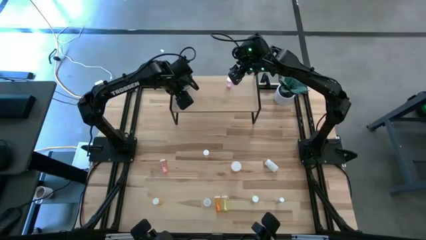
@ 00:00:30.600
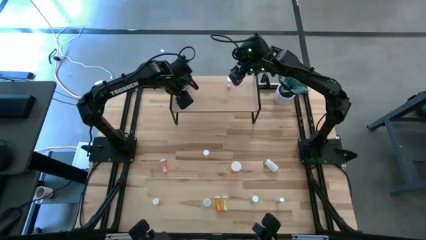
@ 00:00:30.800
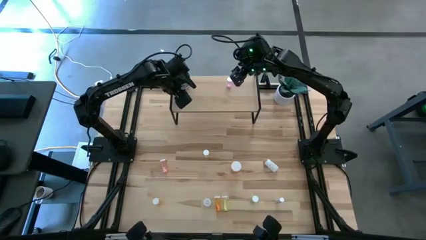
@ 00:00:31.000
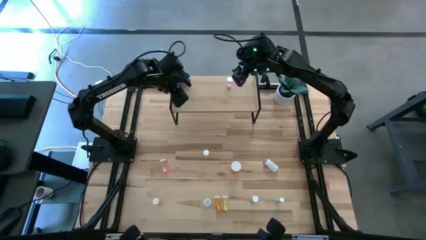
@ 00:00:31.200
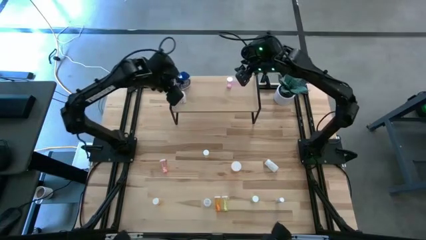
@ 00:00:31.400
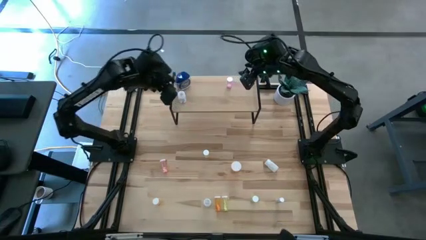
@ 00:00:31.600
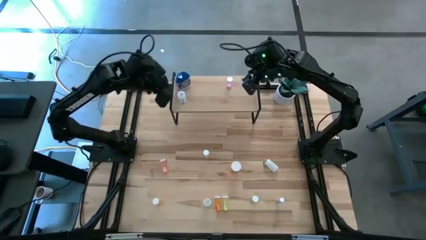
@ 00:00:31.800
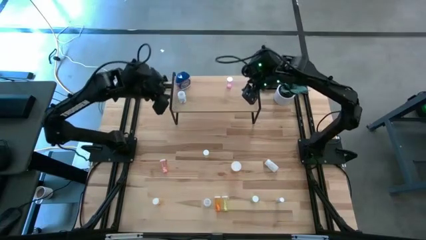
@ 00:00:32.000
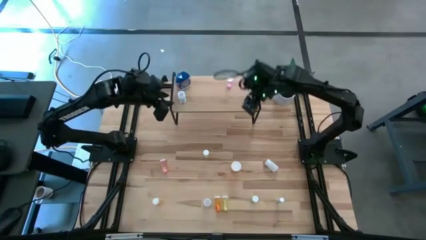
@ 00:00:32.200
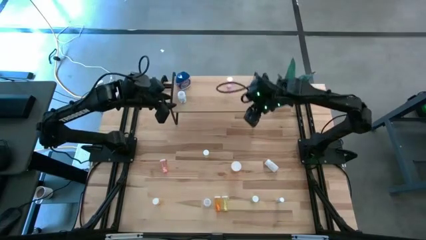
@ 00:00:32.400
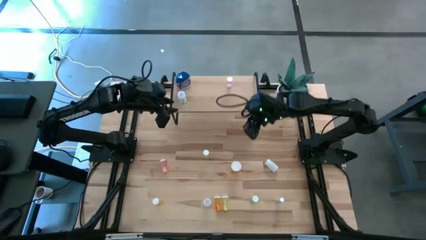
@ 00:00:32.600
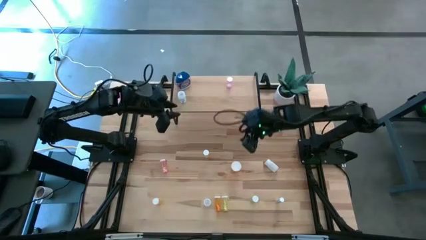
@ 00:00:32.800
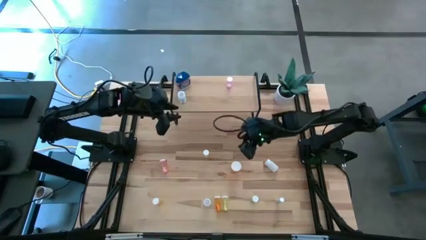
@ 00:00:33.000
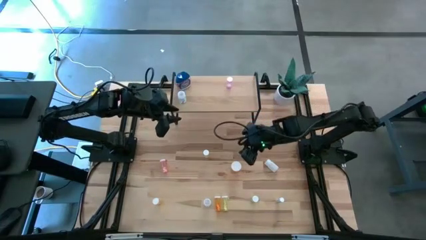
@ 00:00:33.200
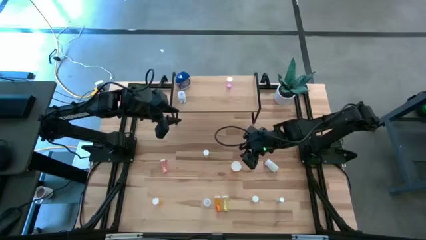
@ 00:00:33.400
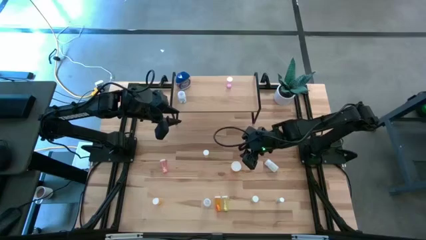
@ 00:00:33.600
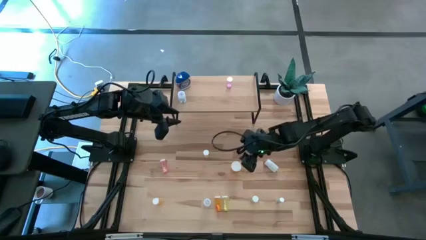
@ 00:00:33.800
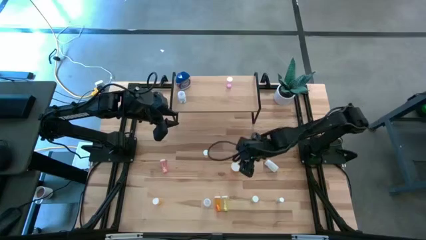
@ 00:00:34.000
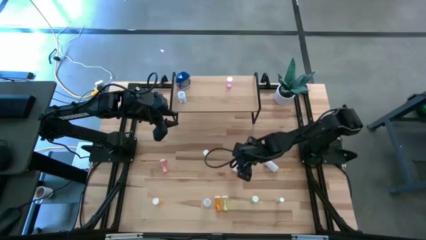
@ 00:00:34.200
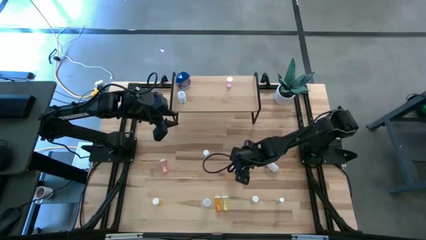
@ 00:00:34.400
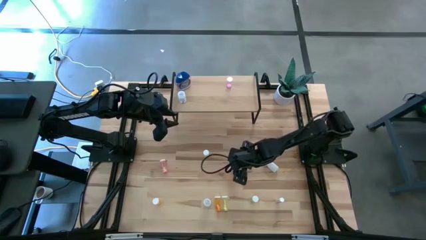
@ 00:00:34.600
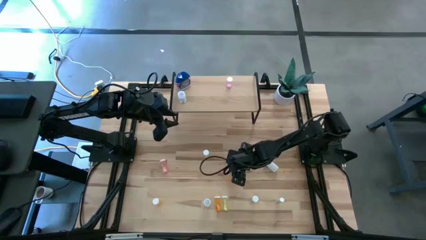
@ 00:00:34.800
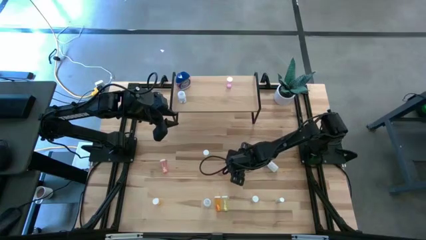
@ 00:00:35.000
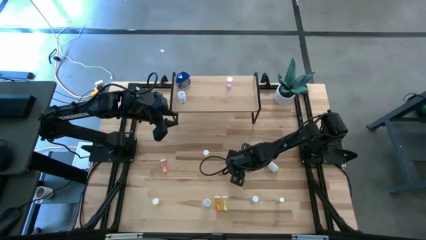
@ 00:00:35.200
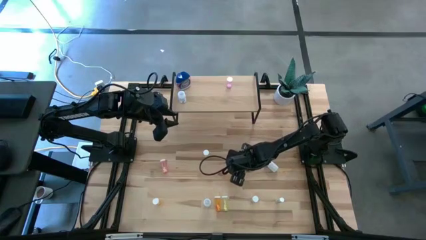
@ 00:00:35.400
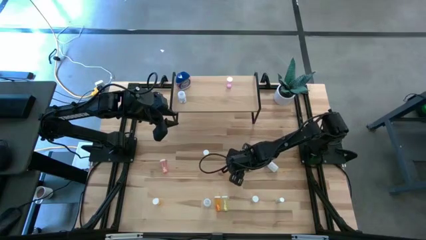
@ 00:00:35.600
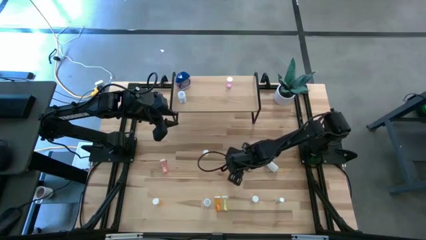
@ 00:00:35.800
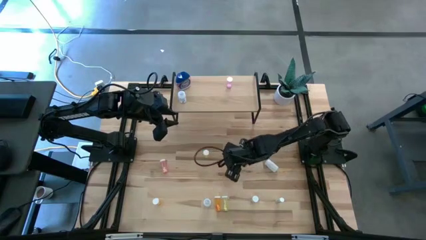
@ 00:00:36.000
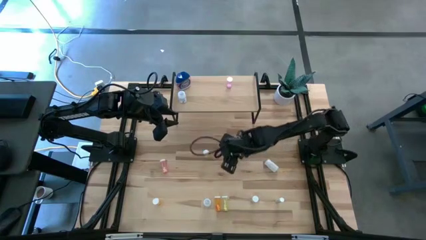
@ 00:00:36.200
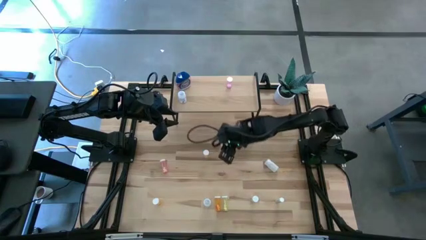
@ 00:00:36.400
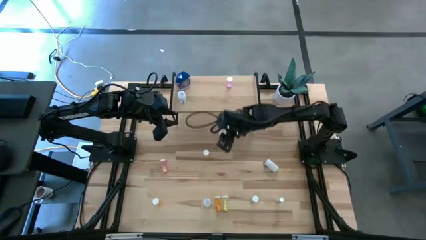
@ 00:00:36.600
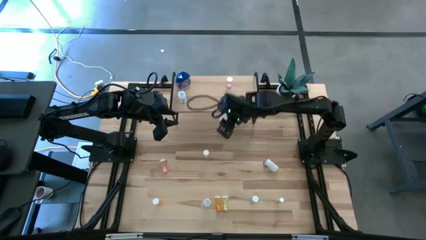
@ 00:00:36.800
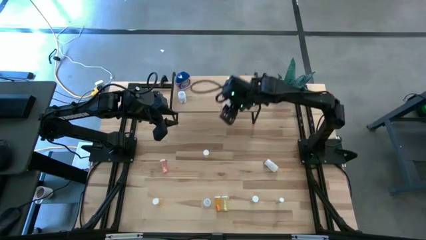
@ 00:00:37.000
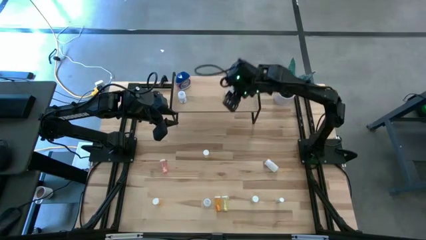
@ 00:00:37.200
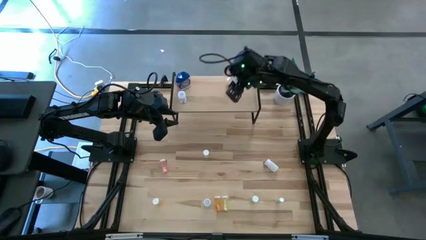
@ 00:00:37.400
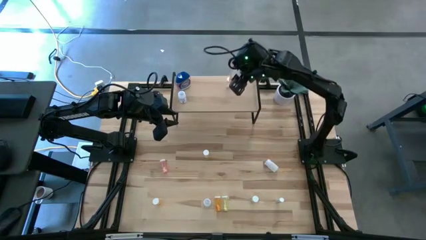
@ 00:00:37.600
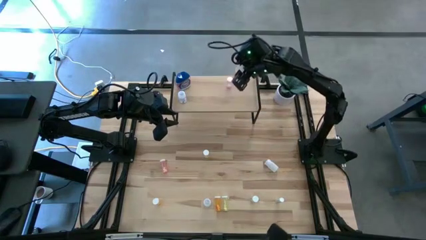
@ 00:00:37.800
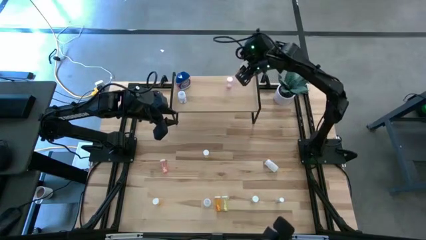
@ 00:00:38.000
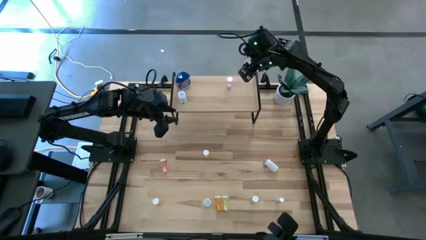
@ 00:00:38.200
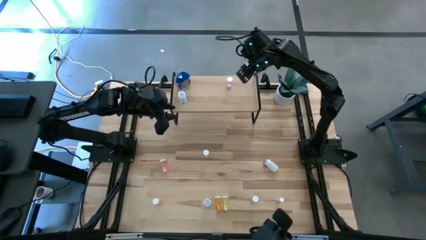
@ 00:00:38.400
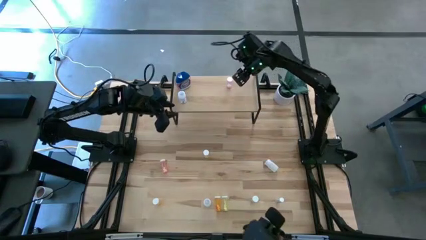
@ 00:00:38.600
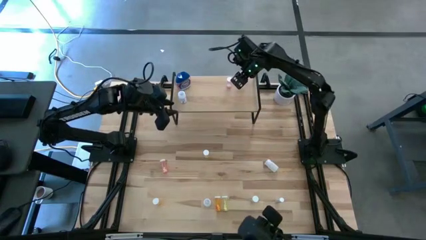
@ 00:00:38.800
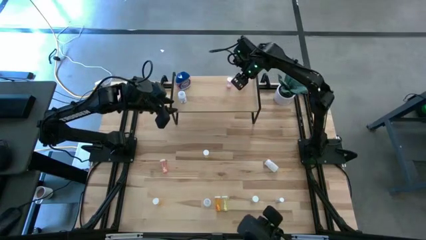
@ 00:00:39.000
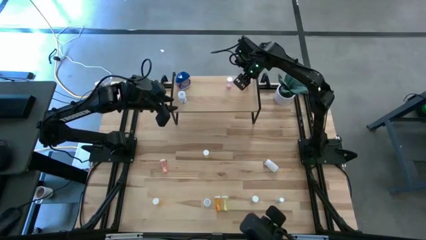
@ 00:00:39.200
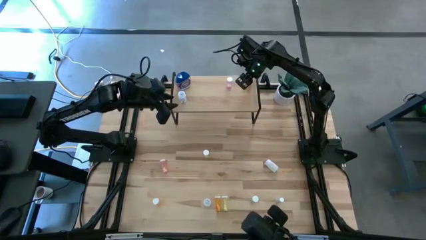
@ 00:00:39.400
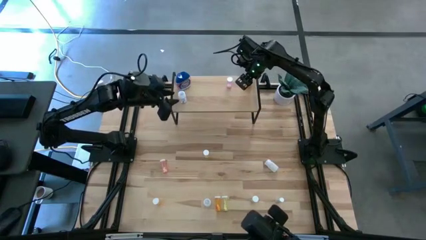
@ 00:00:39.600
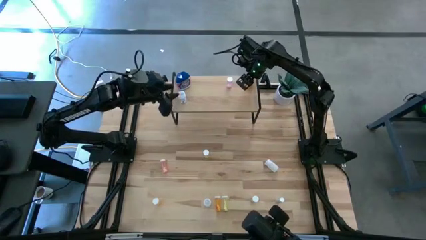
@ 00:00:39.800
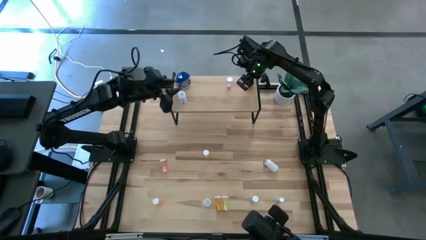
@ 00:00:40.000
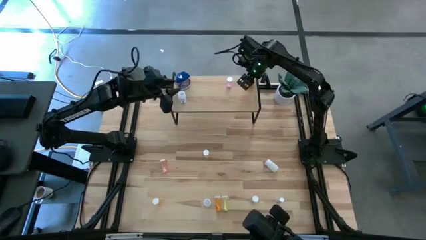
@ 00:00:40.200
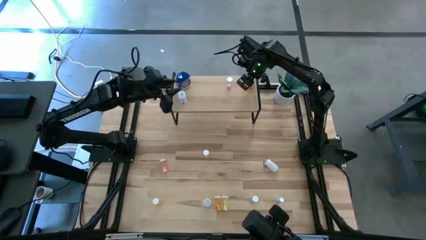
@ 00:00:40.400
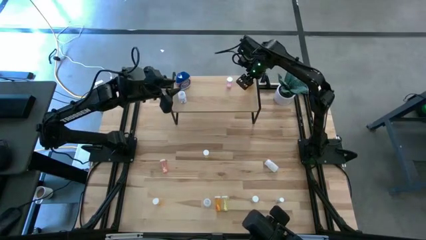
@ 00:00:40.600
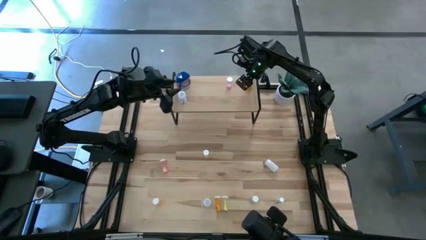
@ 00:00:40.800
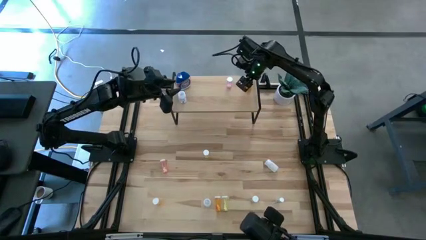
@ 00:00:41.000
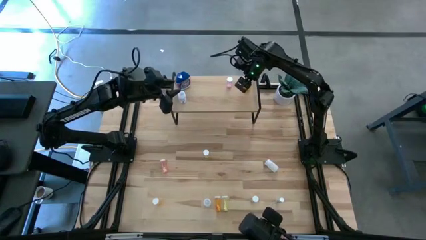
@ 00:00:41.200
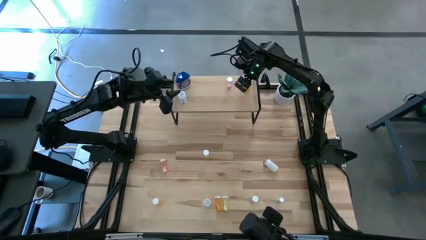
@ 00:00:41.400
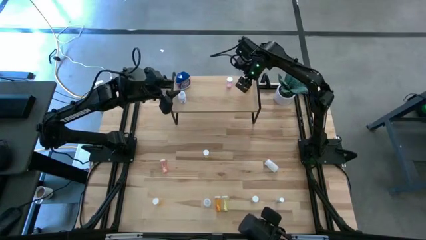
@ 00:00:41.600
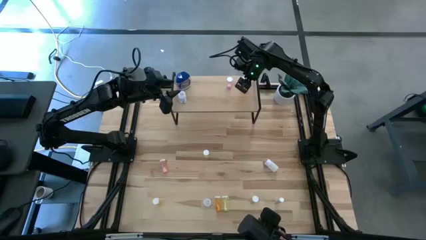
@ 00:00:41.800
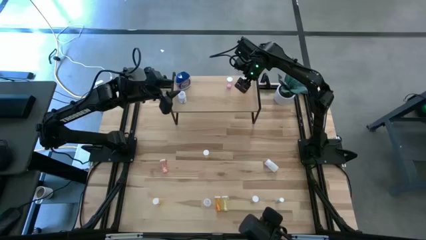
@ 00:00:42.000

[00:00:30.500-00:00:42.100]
Task: Pick and place medicine bottles onto shelf by color
Put the big orange pill bottle on the shelf
